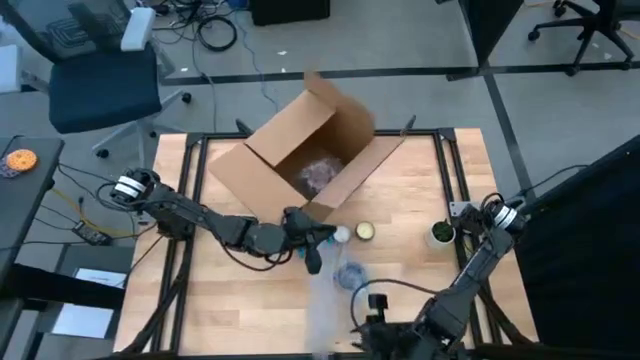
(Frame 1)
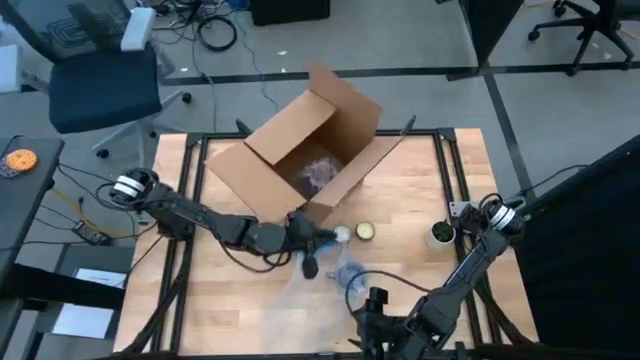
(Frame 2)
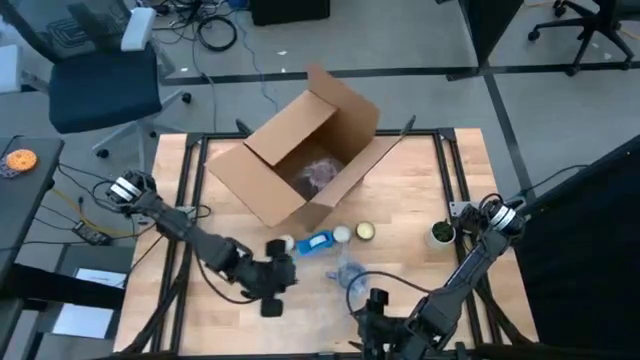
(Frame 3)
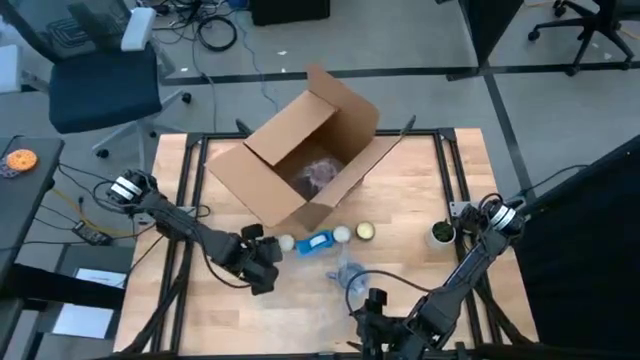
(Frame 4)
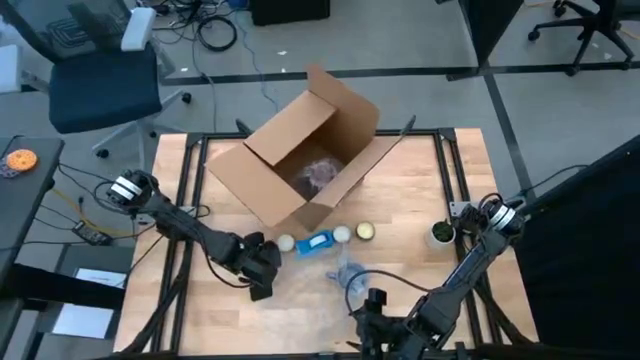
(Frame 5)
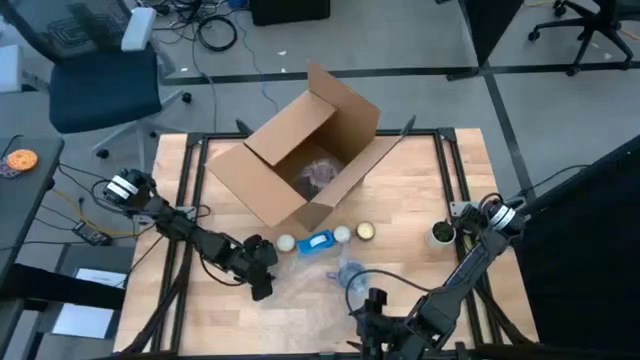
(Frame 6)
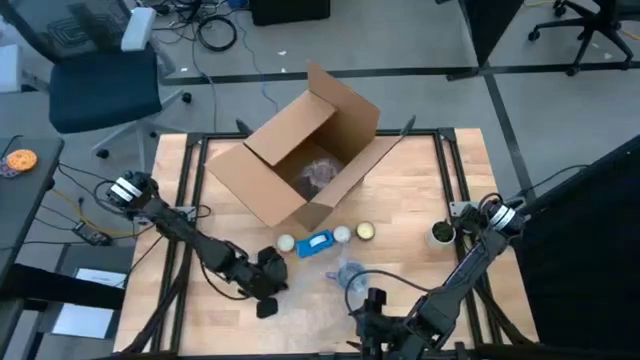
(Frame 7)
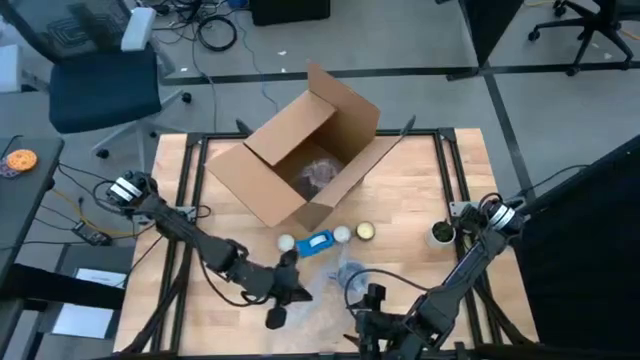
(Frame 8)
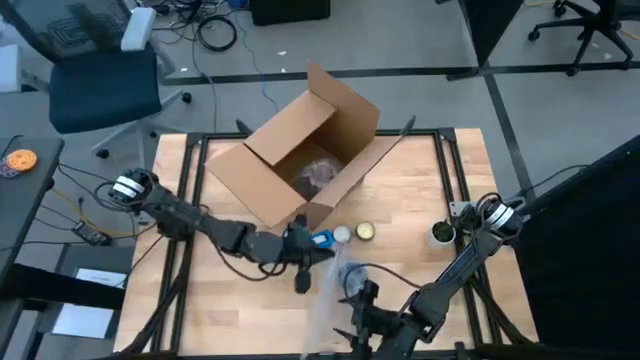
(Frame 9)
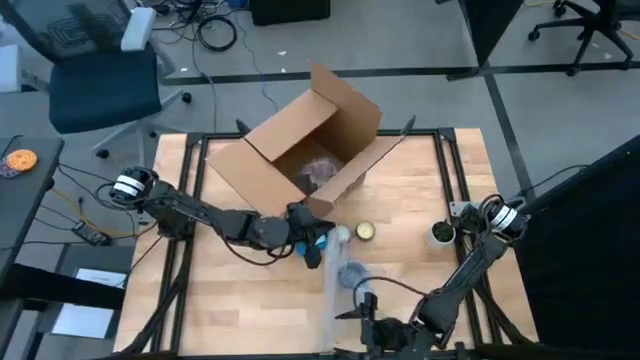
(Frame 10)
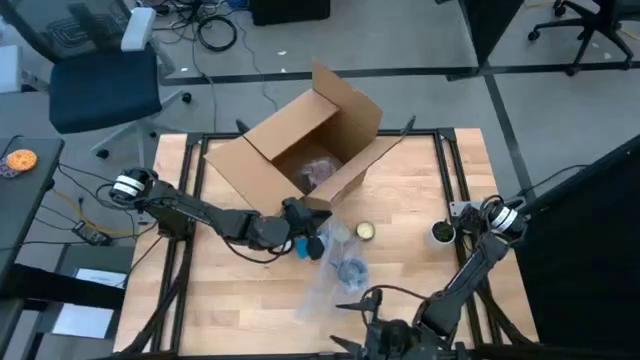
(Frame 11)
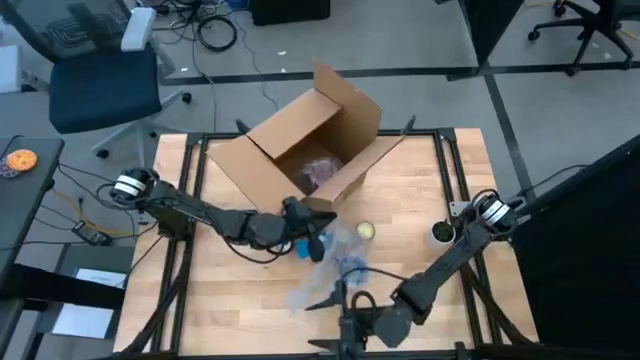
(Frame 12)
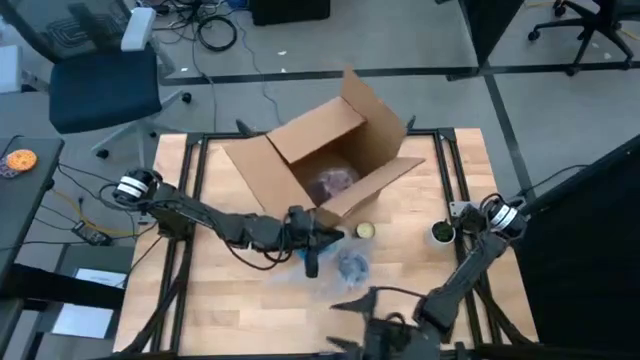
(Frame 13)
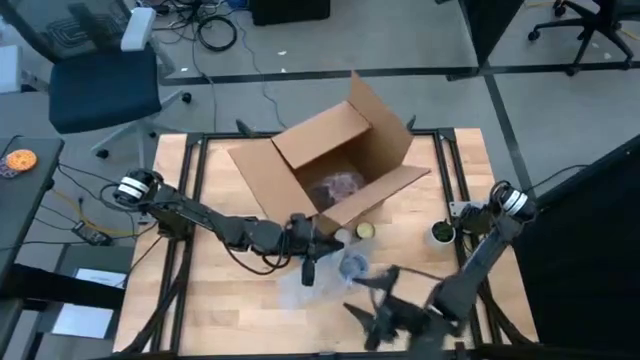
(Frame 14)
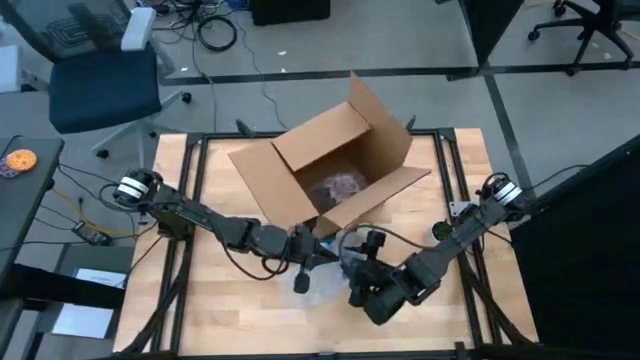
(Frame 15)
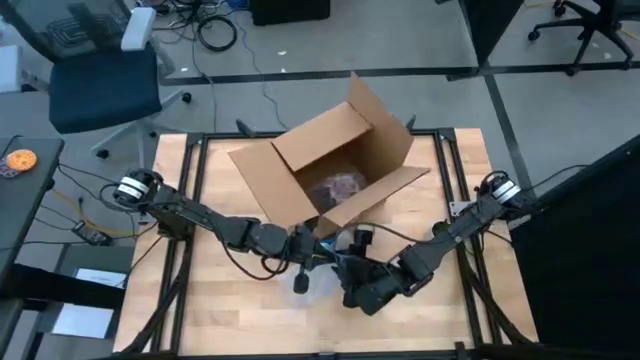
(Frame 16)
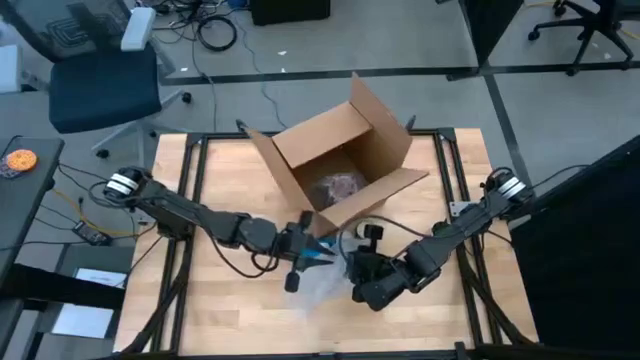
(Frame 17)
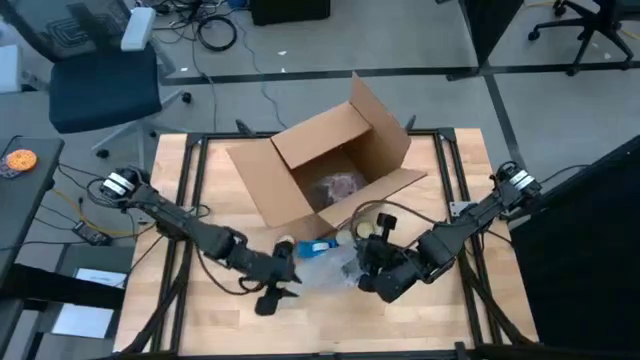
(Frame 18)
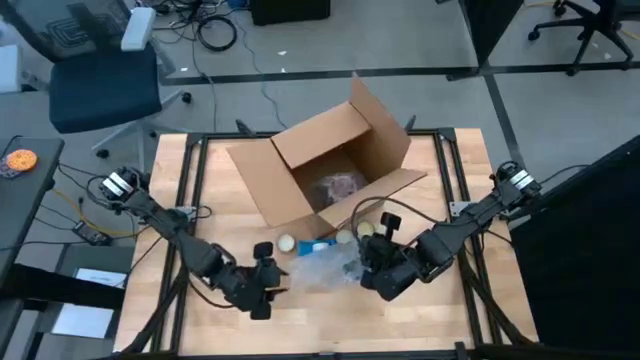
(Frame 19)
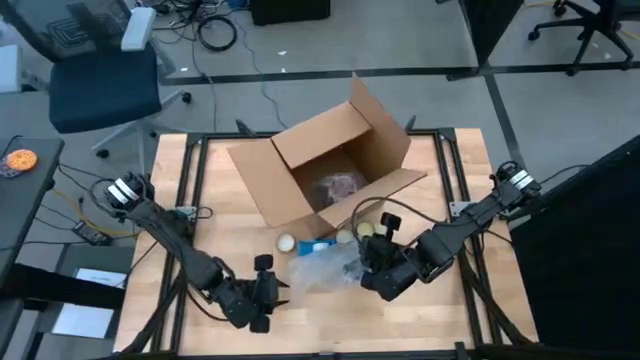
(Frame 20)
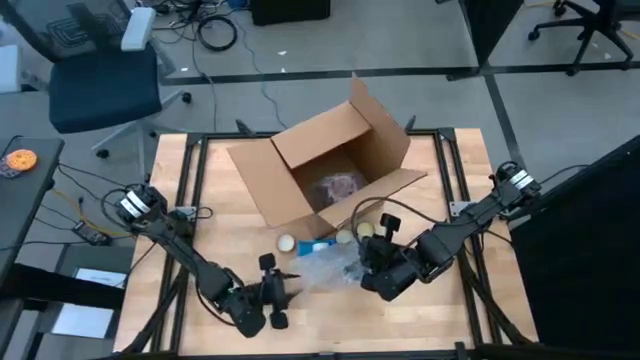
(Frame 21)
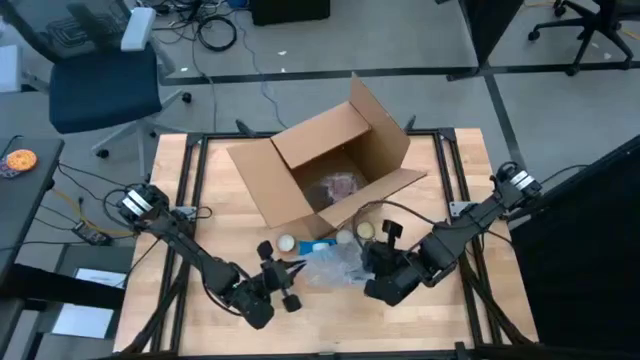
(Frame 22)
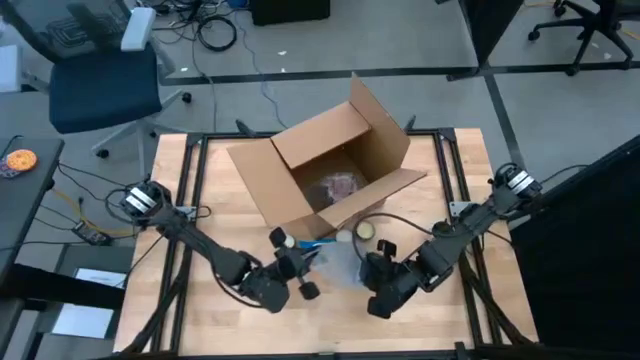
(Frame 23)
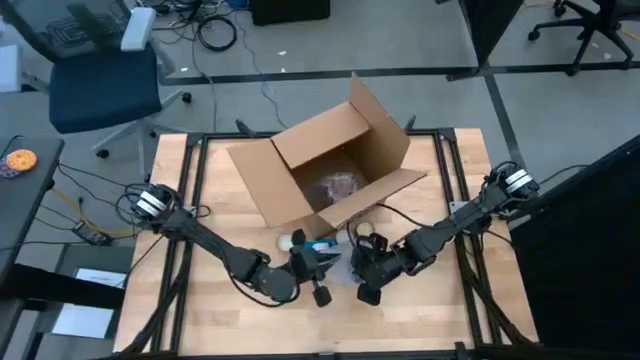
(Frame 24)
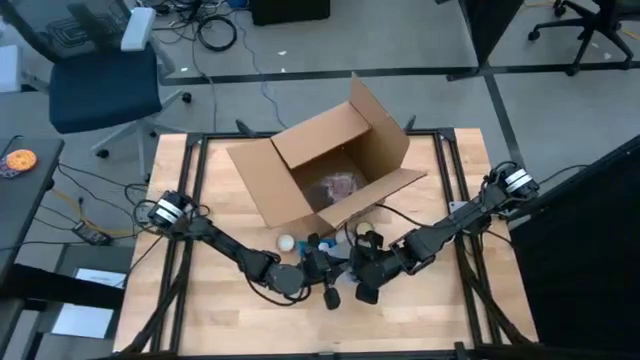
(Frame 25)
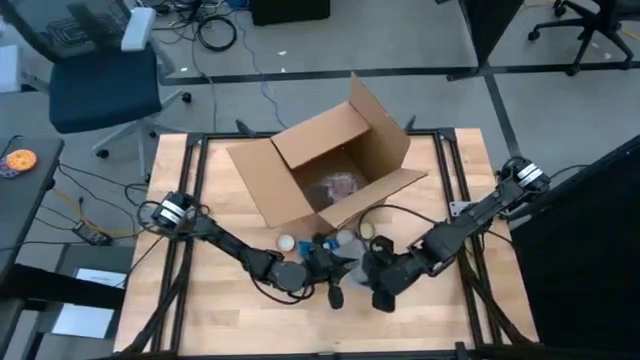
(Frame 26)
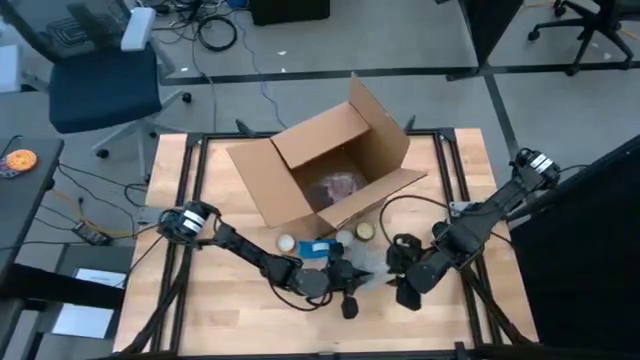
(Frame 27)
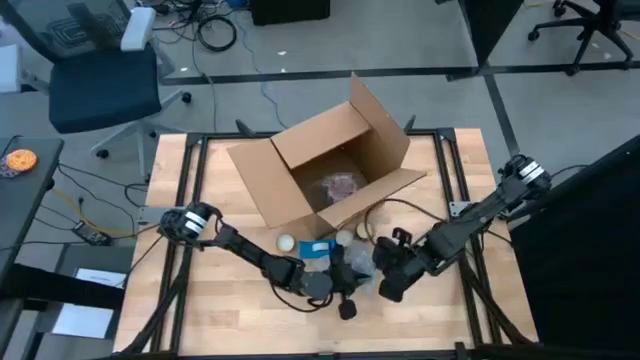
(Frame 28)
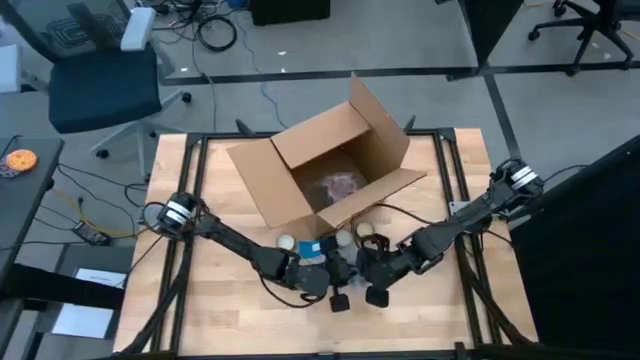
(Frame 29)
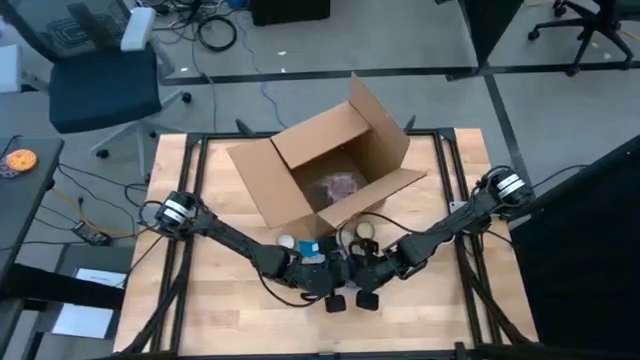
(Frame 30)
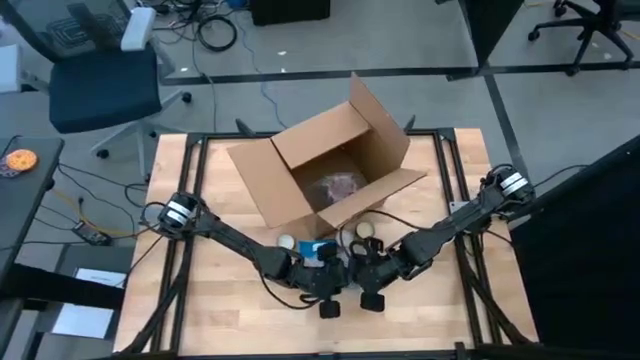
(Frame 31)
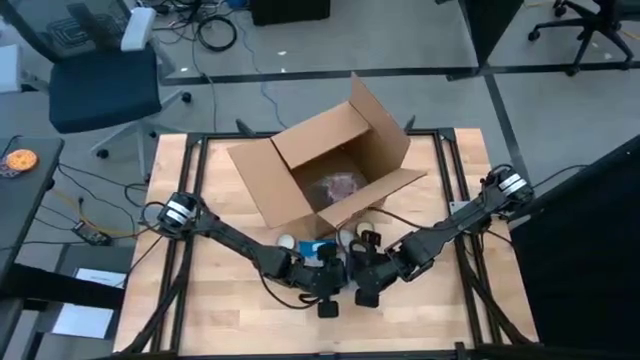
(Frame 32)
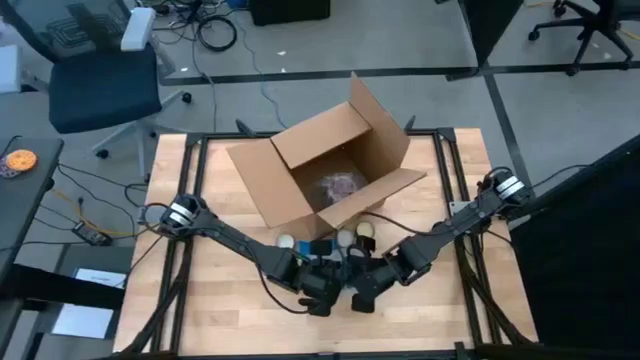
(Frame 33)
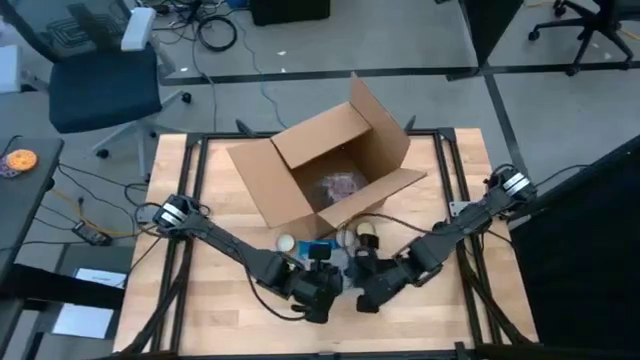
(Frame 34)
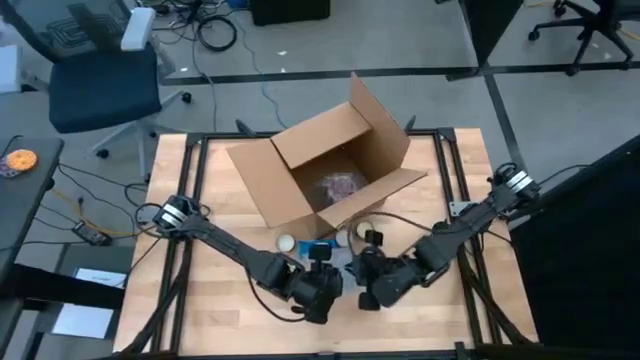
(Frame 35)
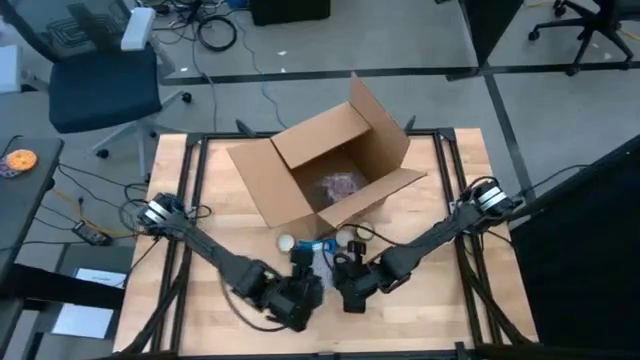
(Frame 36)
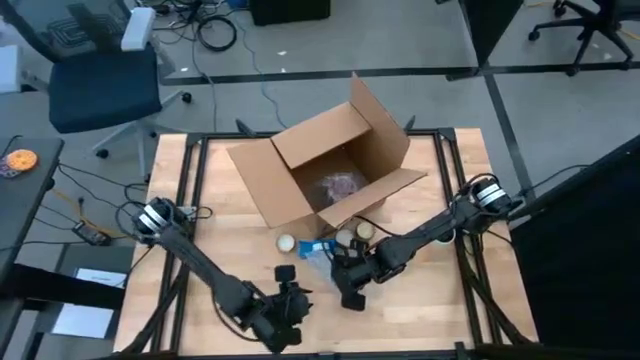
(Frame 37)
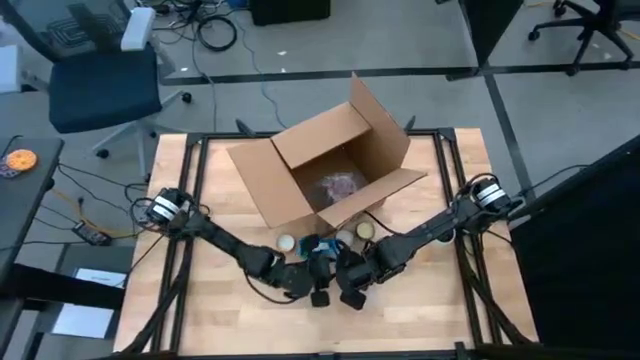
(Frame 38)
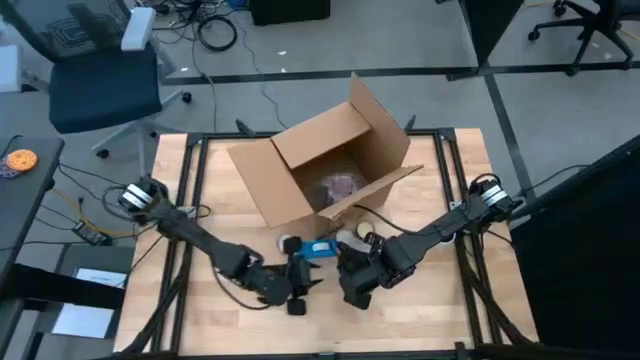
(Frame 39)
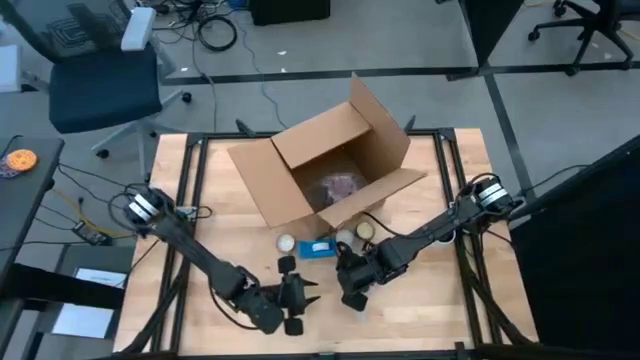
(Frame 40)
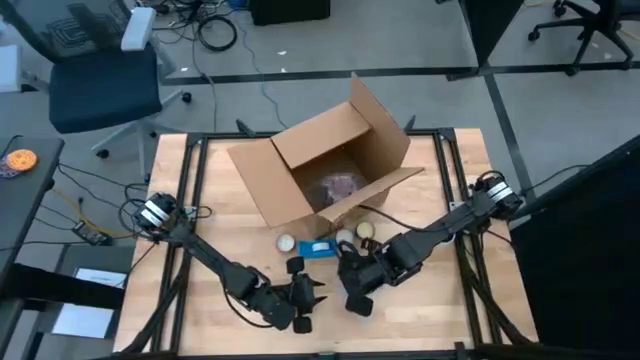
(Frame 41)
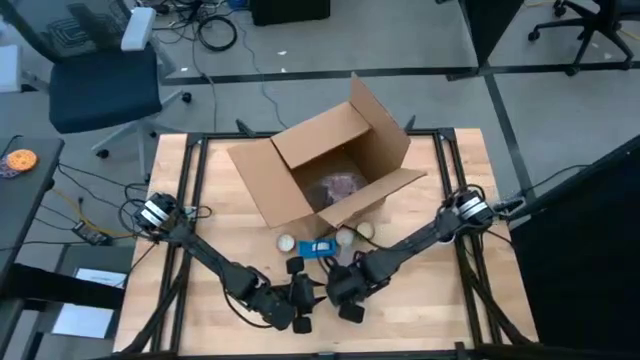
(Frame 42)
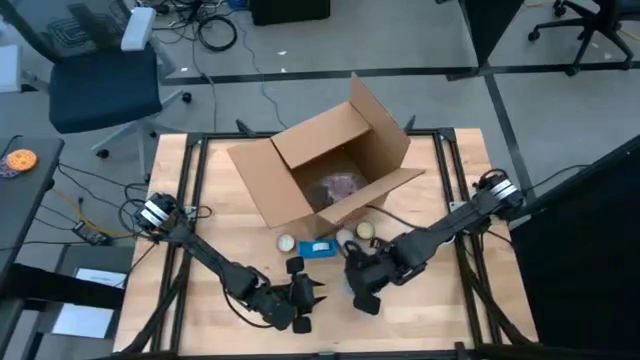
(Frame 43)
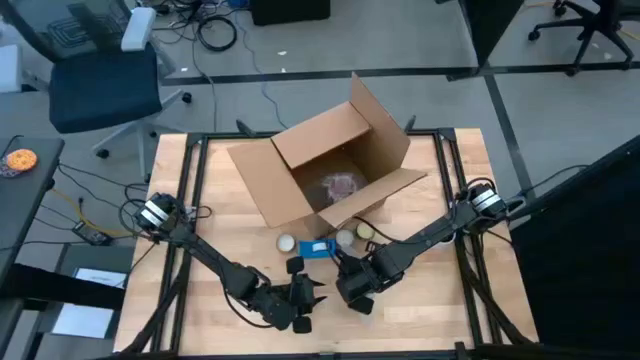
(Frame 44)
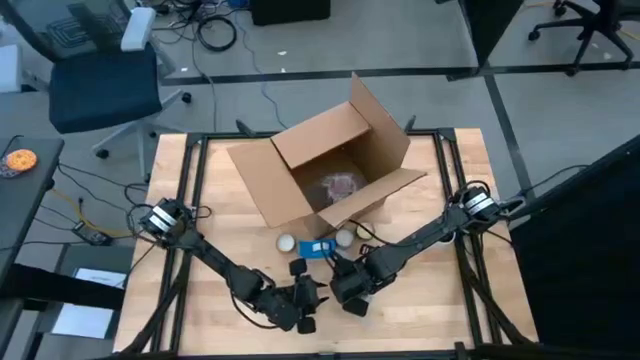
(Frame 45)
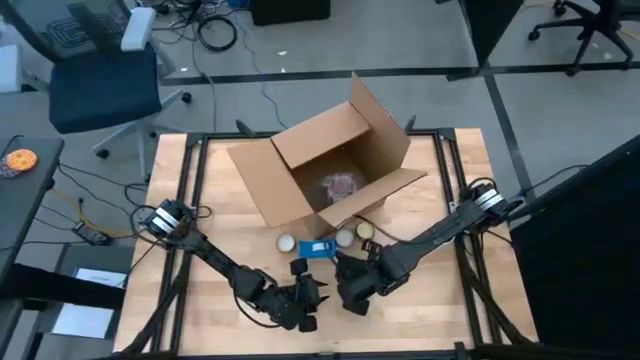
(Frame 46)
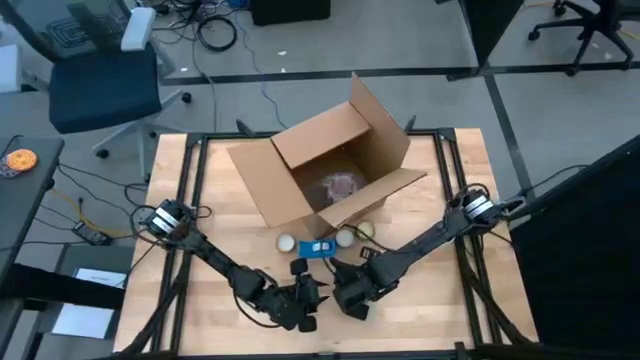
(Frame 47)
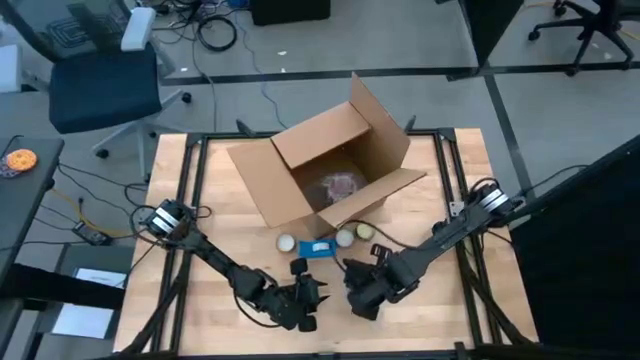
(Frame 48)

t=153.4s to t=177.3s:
Task: wrap mug
Wrap the purple mug with the bubble wrap
